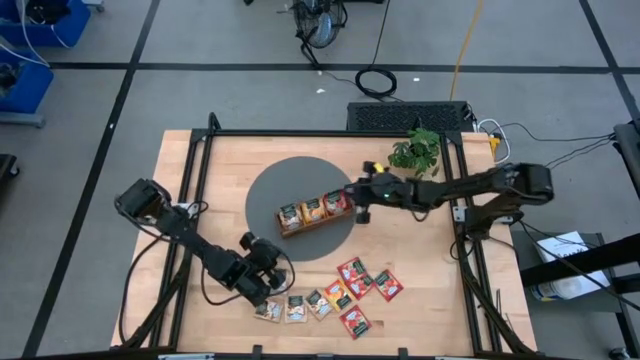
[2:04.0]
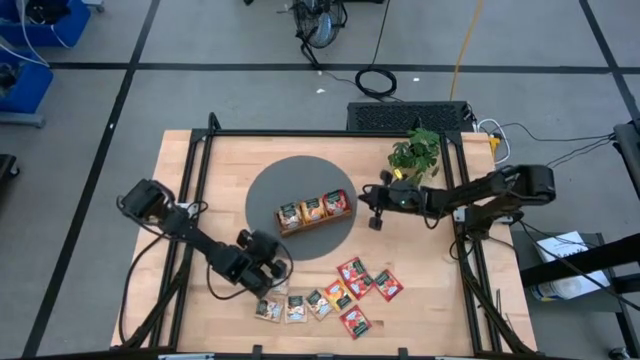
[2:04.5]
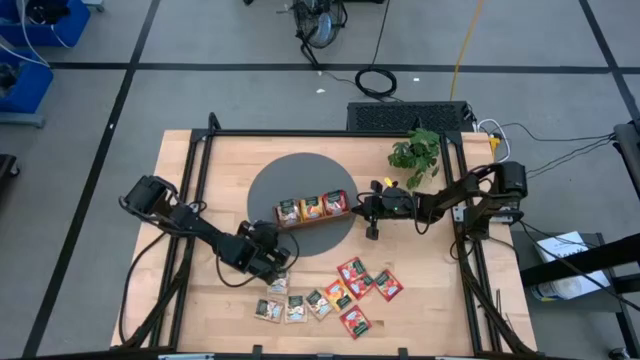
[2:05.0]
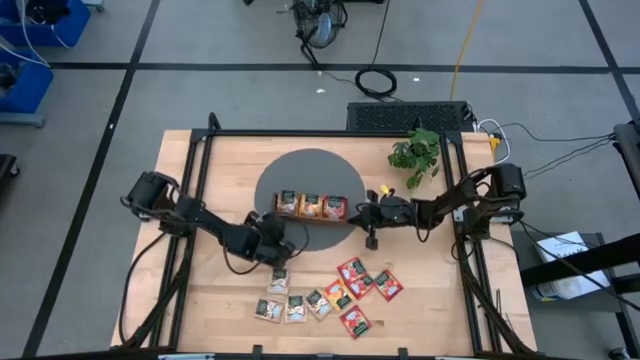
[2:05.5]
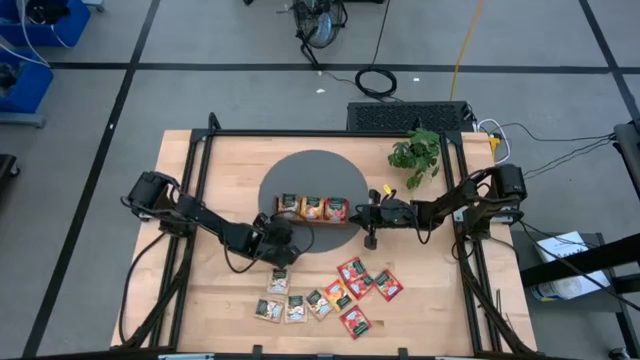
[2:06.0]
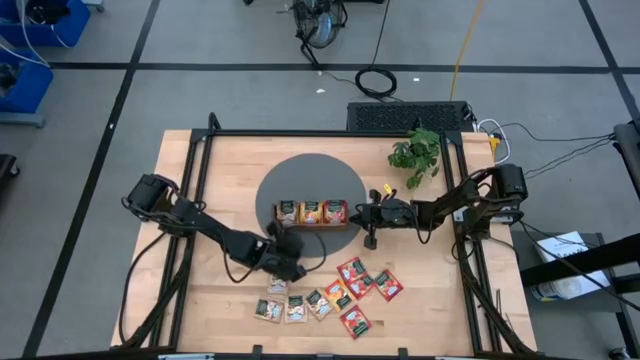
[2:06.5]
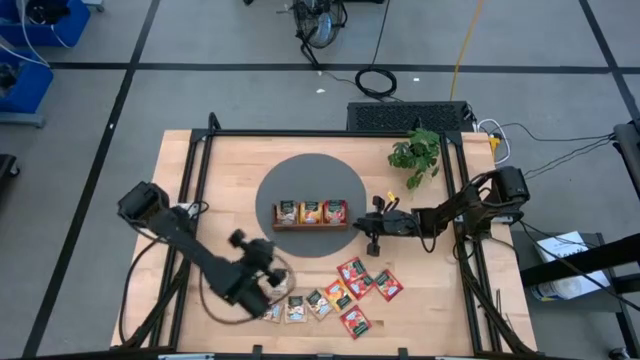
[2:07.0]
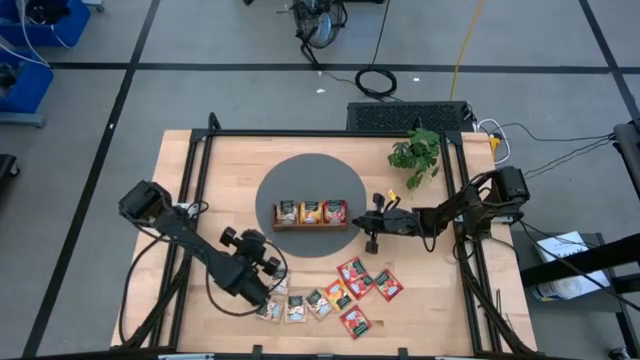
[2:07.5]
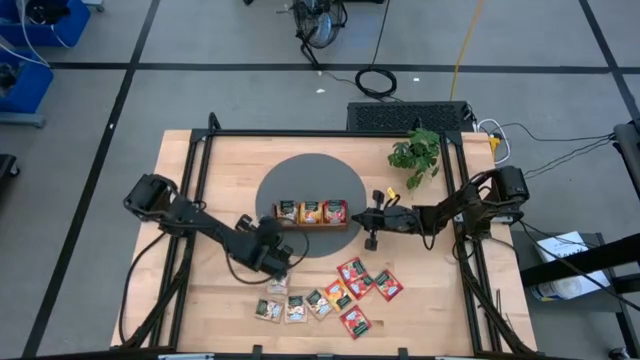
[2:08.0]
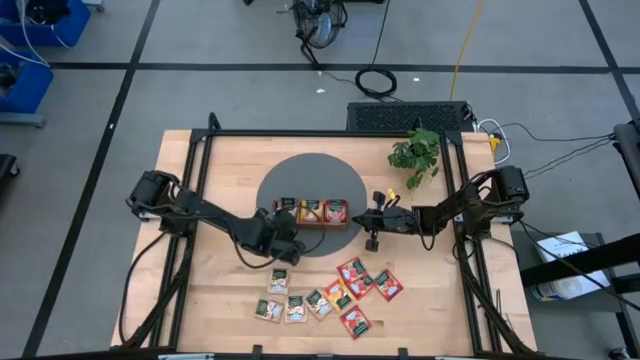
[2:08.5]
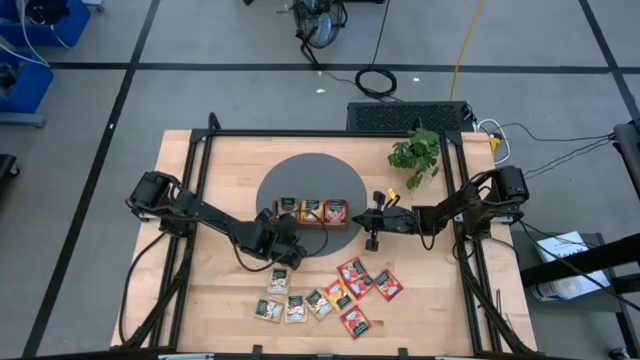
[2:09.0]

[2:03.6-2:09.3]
Task: Pick & Place Tea
Adjust the wooden organizer

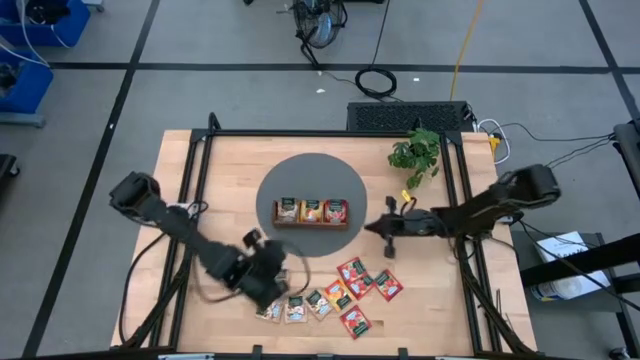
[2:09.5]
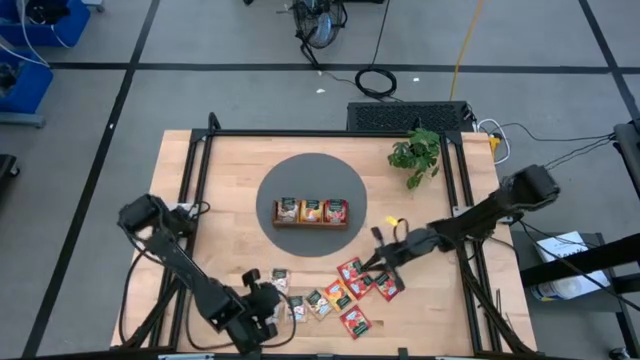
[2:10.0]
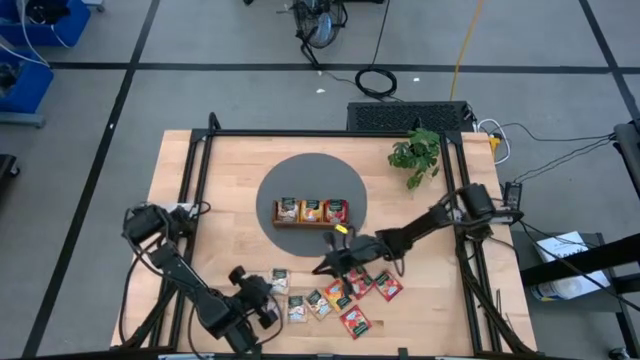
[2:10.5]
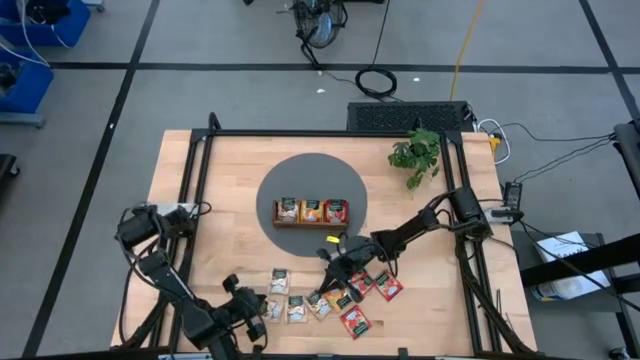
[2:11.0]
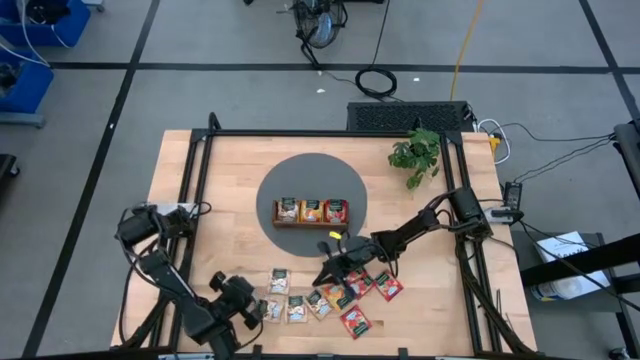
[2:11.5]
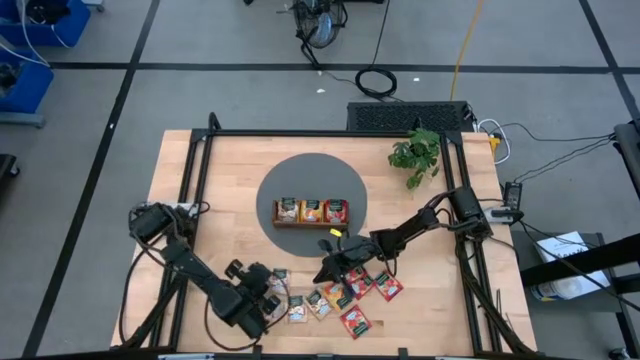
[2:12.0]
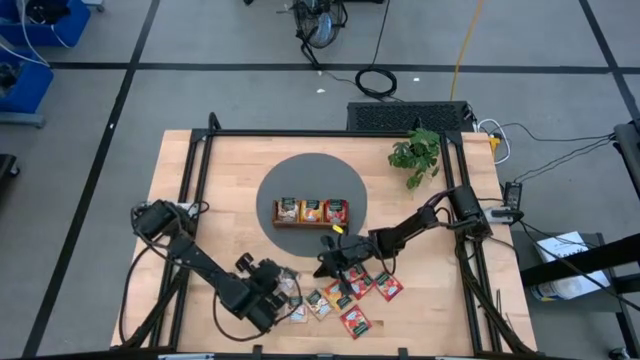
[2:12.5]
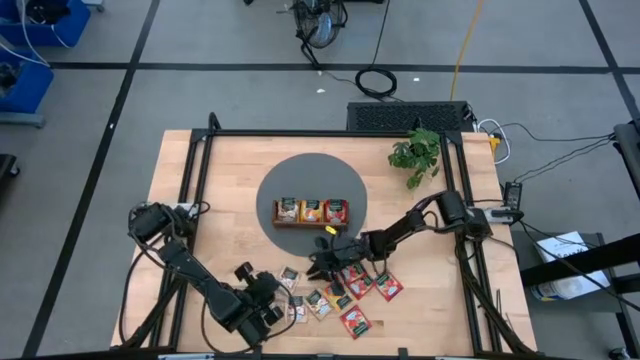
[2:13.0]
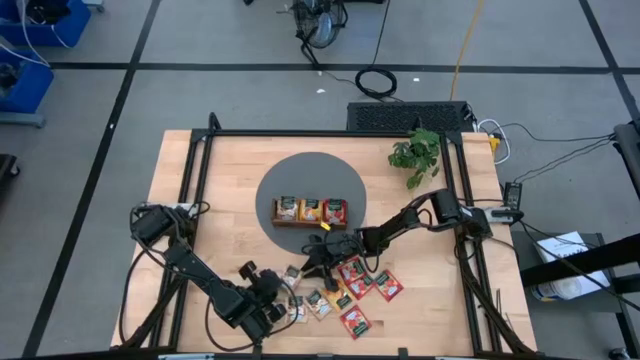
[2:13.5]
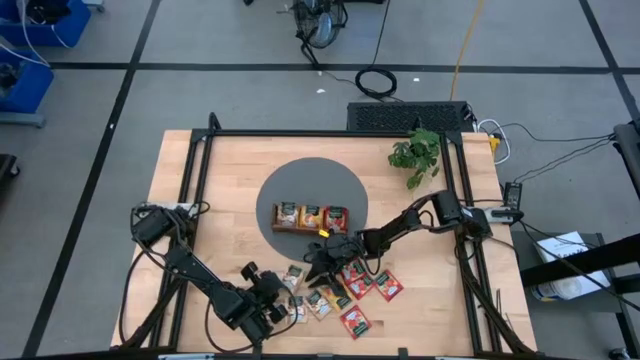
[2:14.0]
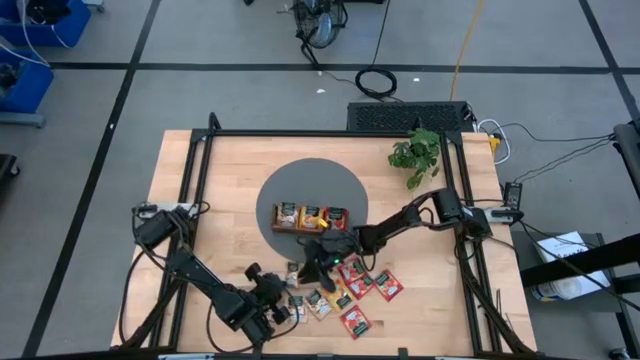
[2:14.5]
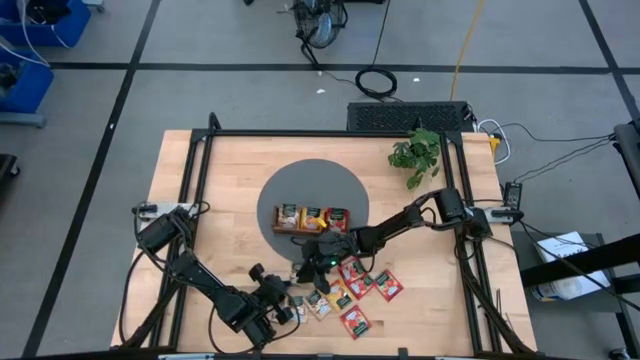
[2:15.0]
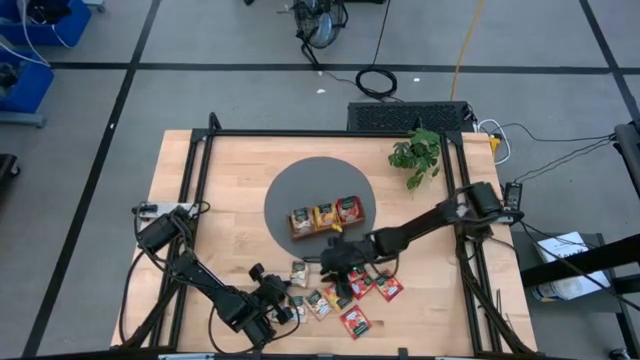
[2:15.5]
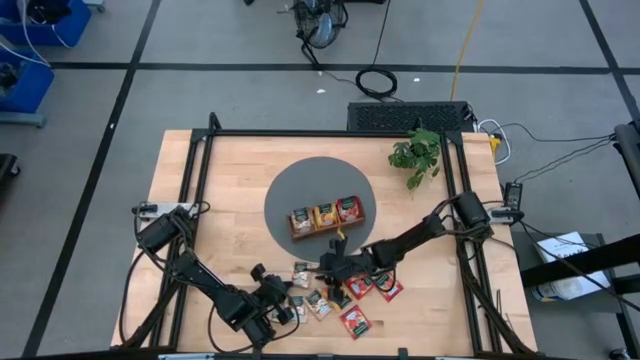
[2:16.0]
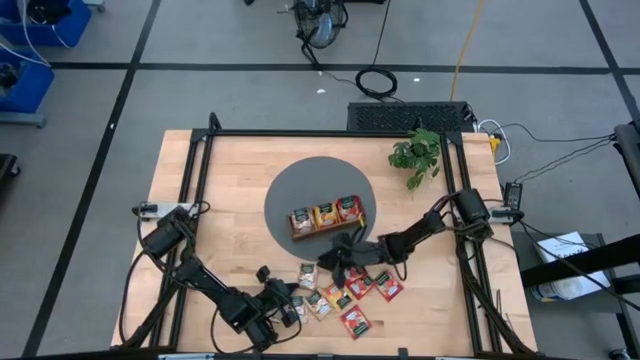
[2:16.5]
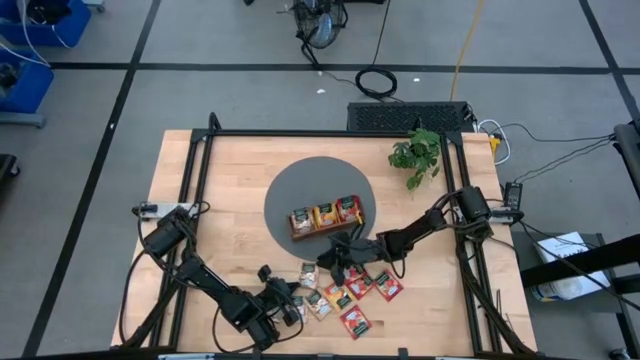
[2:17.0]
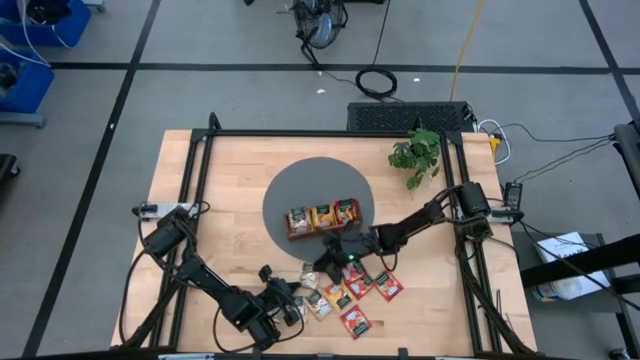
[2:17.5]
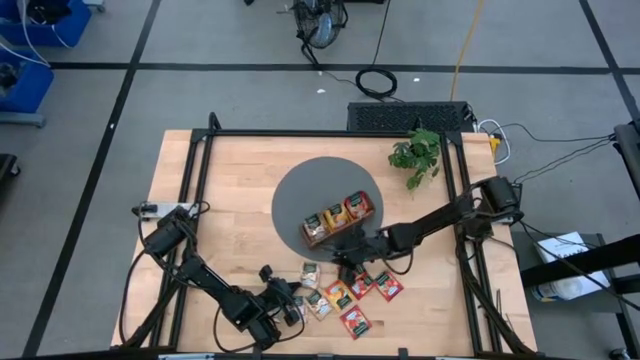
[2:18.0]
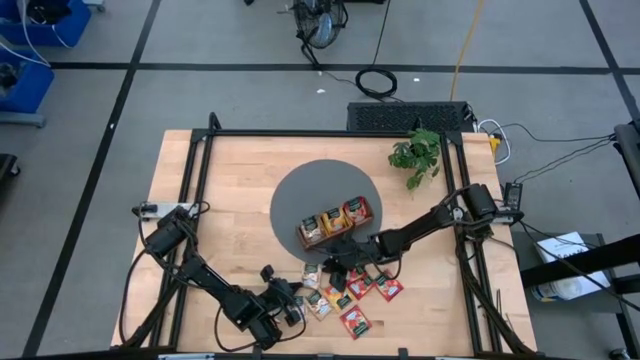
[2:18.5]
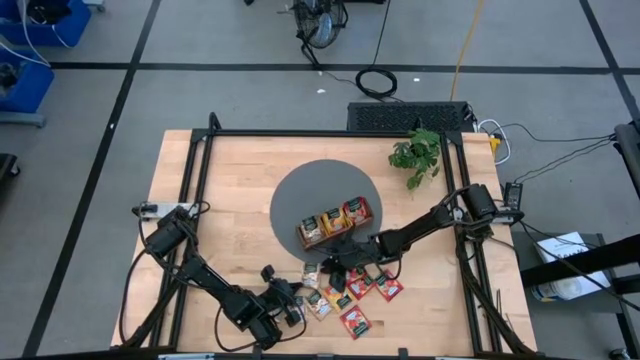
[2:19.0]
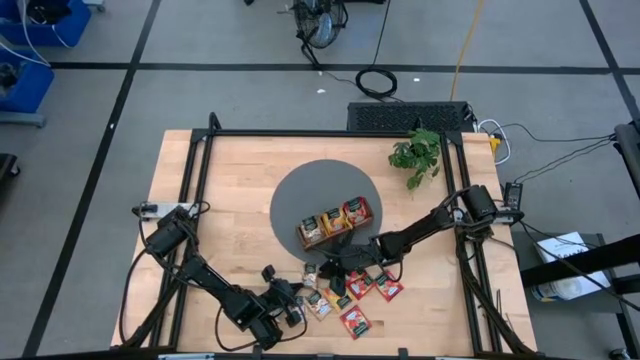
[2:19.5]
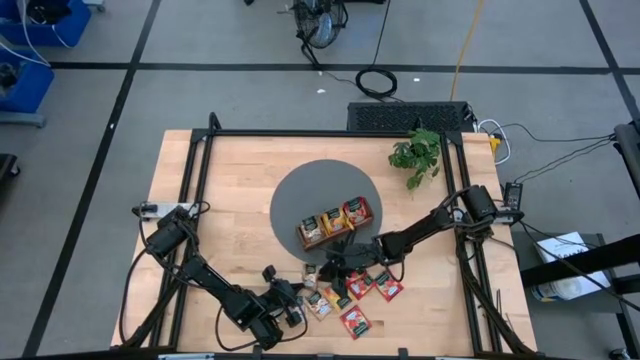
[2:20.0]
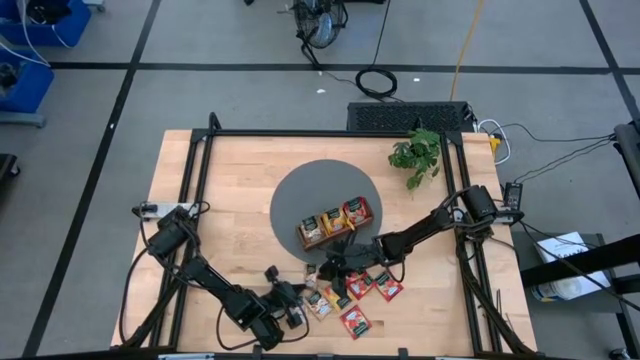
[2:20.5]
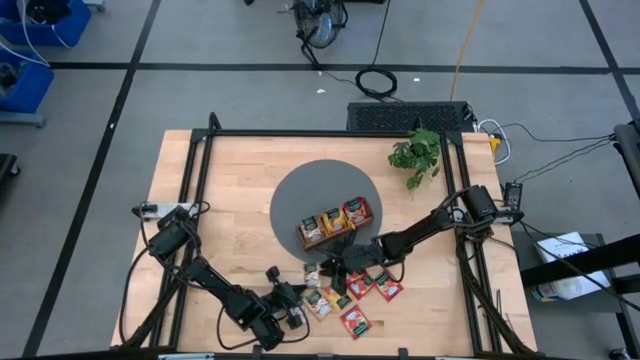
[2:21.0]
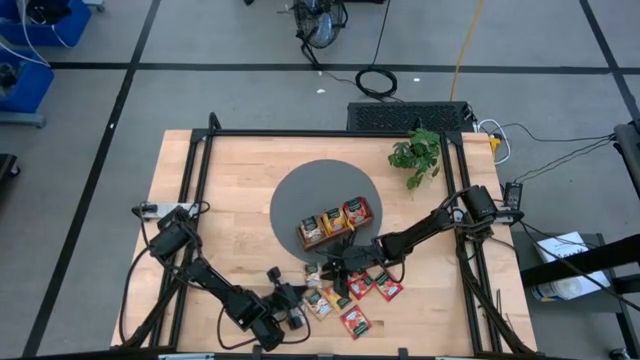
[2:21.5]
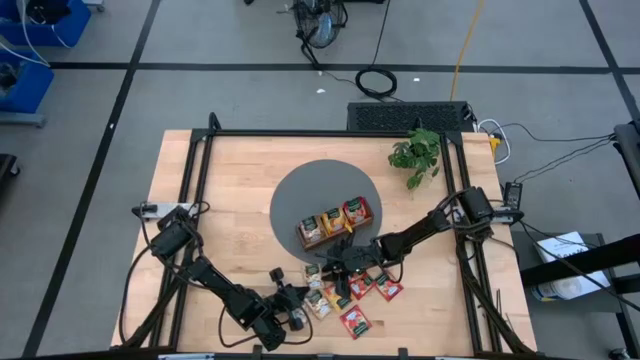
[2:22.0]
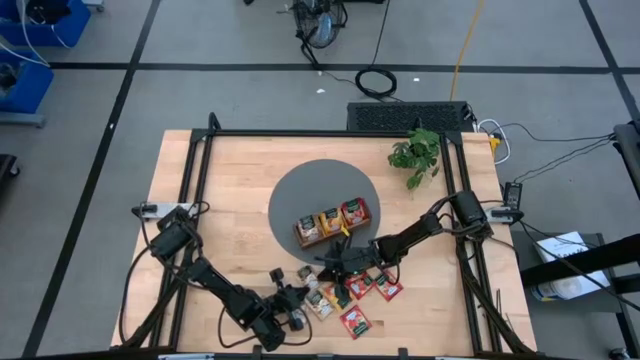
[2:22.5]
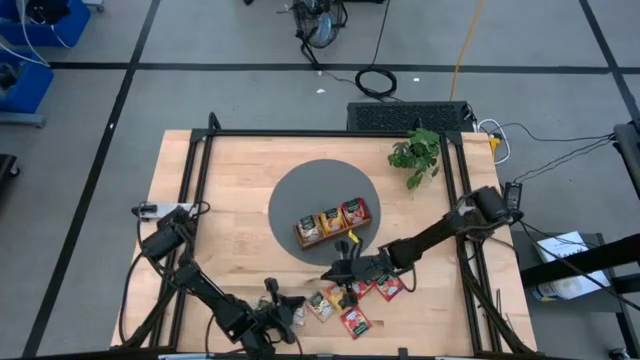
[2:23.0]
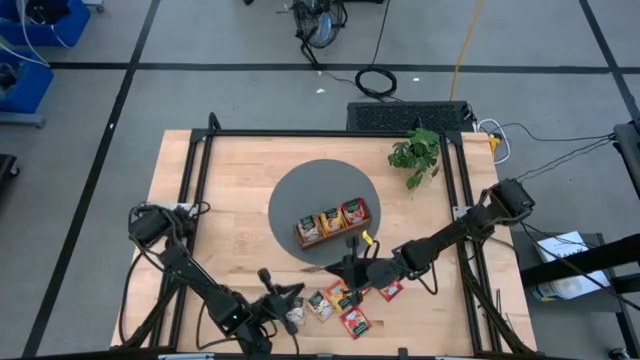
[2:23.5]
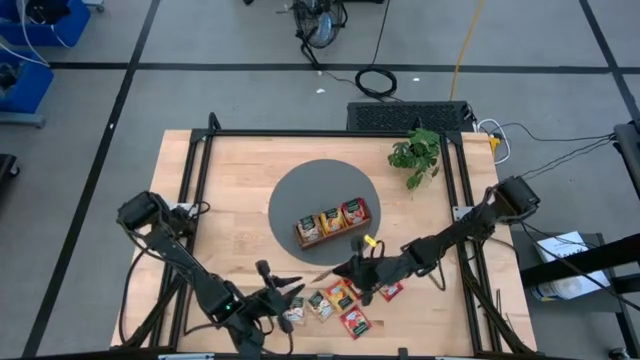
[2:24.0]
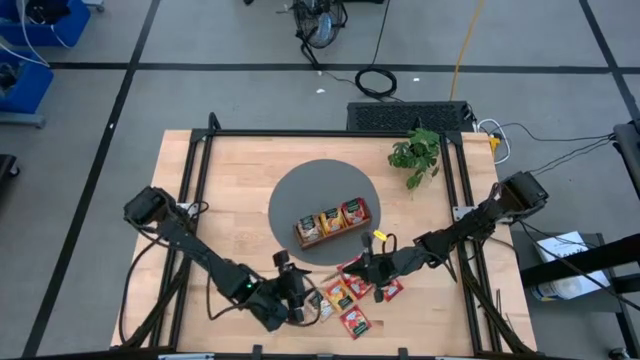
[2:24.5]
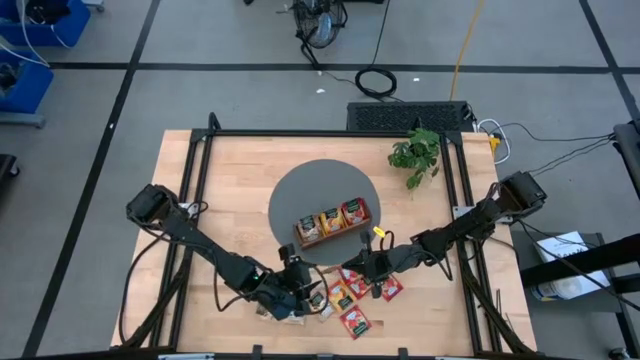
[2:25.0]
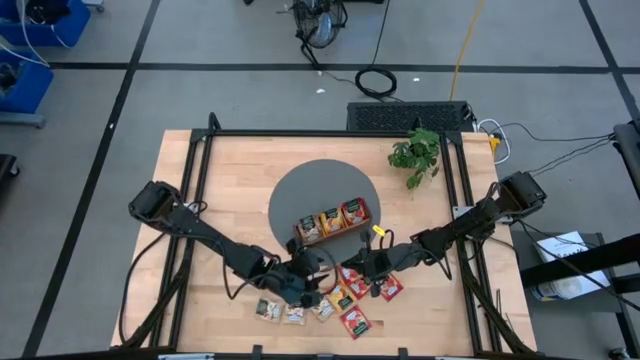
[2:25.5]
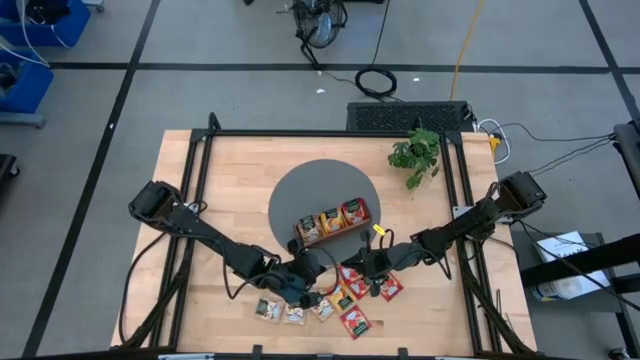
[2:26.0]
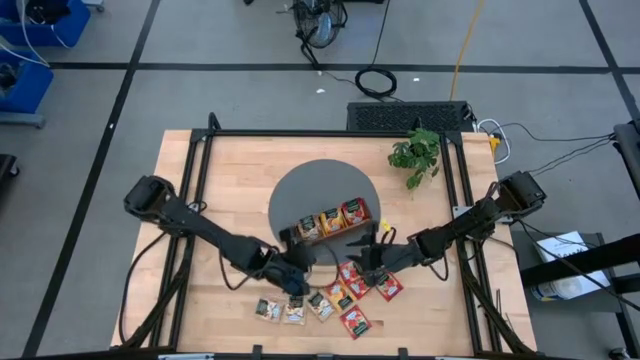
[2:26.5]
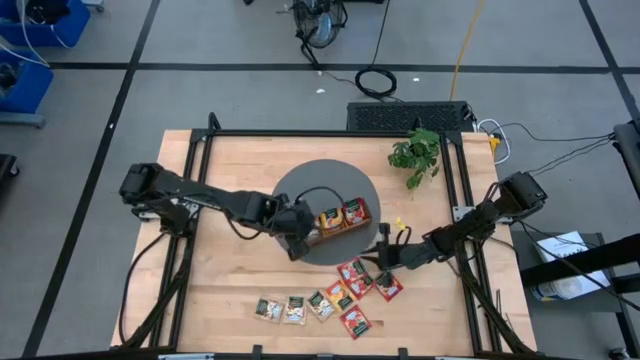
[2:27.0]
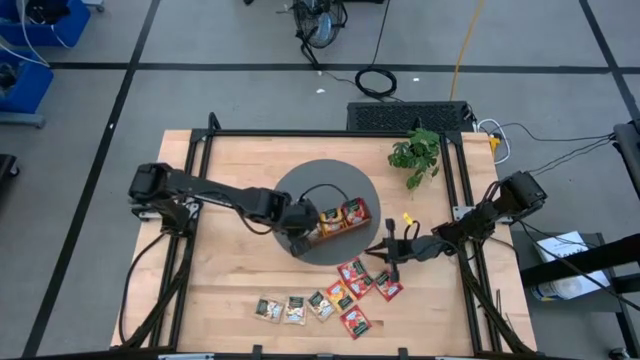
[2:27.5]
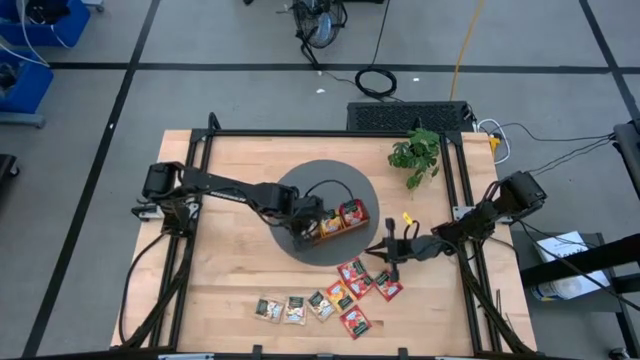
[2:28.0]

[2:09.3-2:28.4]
Put the cinnamon tea sachet into the left compartment of the wooden organizer
